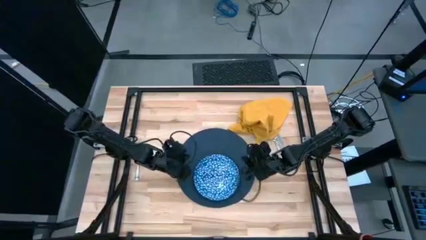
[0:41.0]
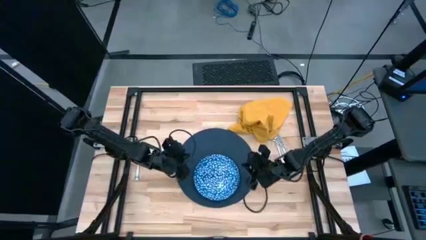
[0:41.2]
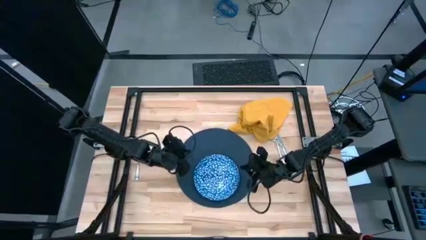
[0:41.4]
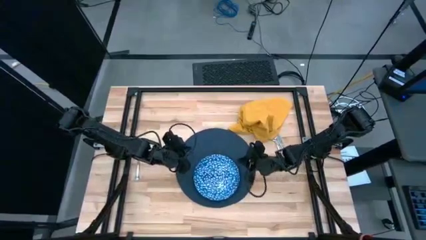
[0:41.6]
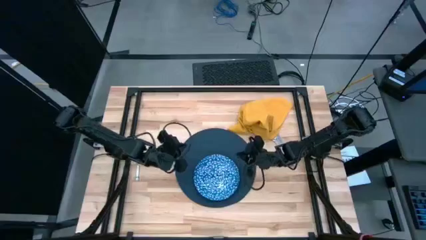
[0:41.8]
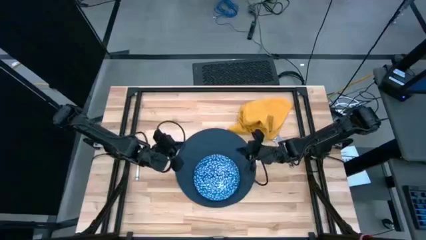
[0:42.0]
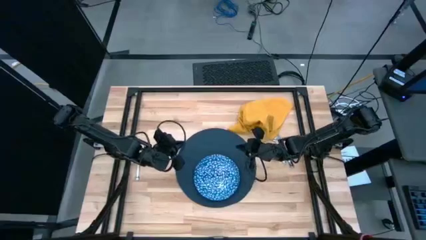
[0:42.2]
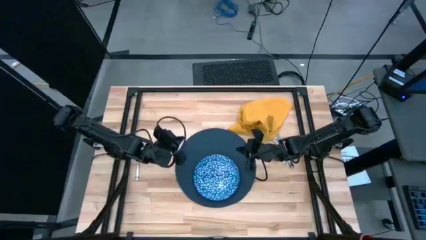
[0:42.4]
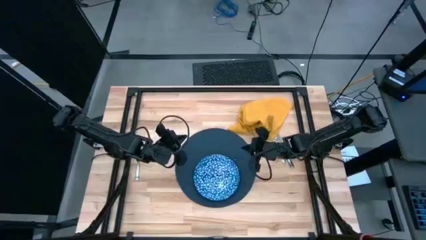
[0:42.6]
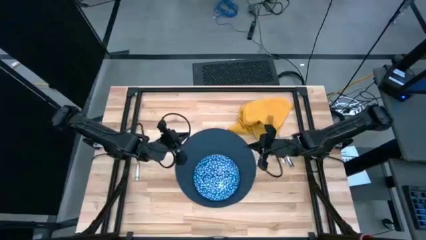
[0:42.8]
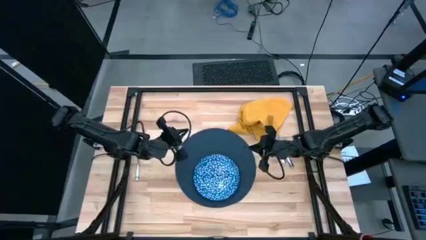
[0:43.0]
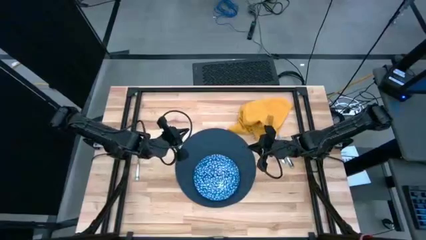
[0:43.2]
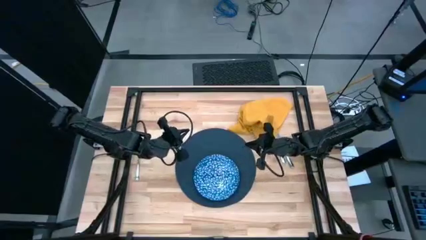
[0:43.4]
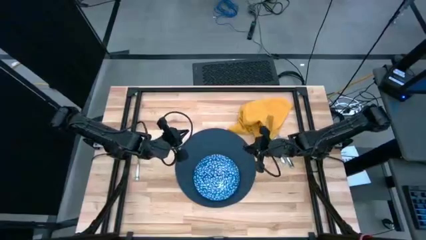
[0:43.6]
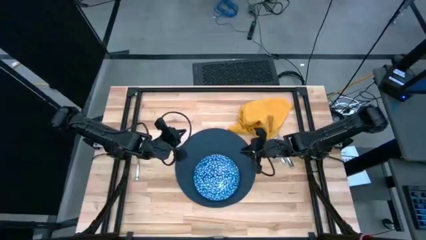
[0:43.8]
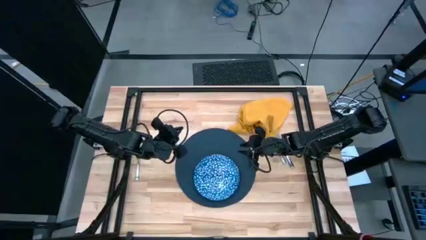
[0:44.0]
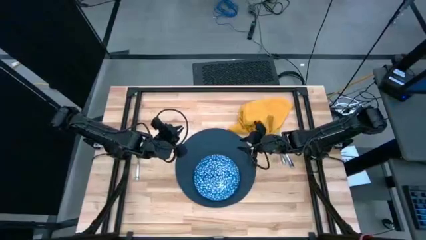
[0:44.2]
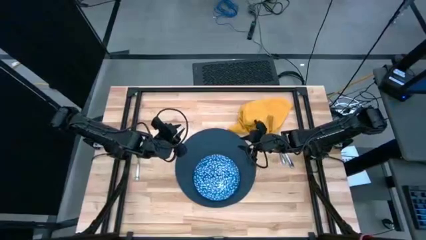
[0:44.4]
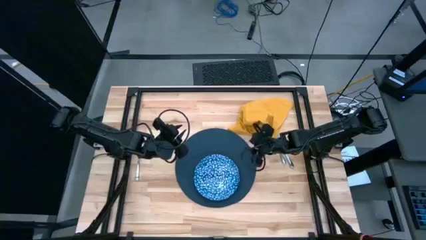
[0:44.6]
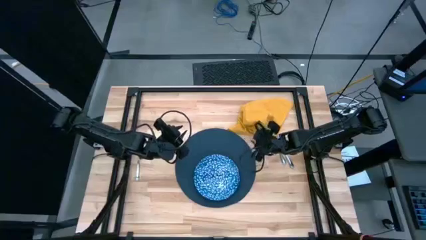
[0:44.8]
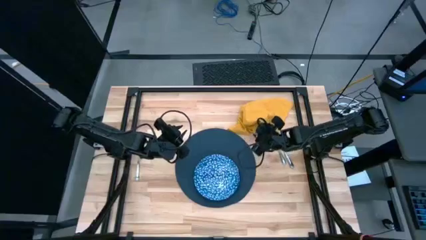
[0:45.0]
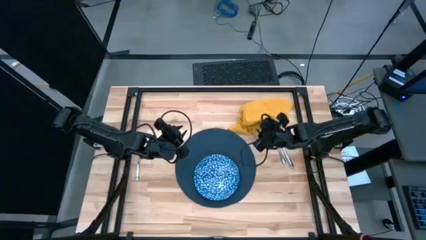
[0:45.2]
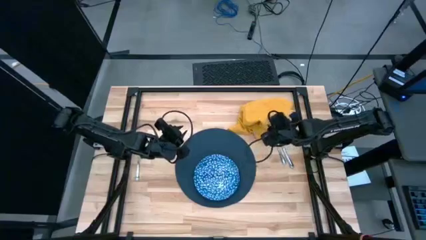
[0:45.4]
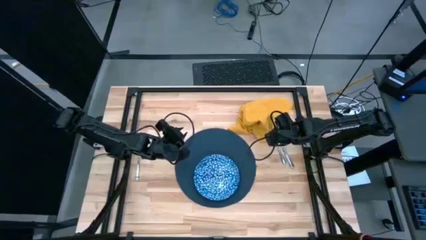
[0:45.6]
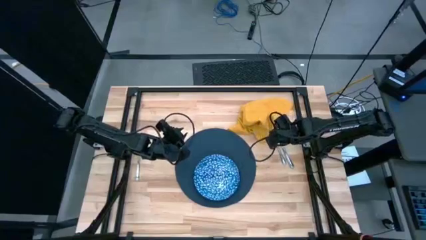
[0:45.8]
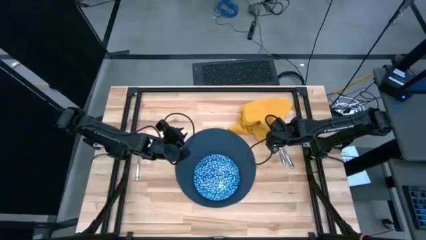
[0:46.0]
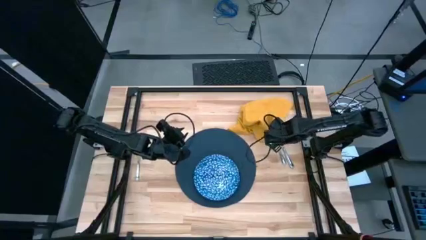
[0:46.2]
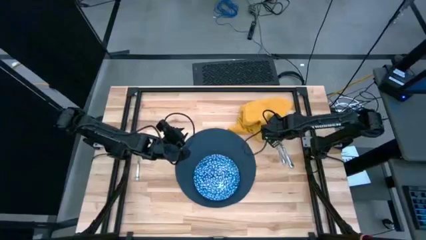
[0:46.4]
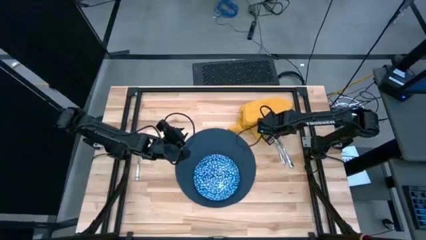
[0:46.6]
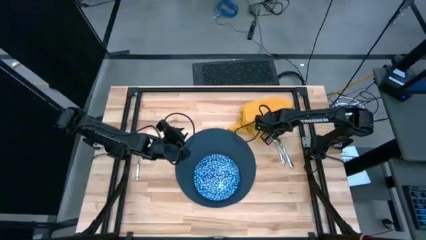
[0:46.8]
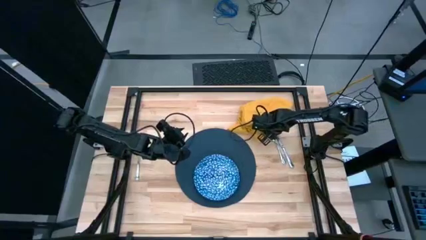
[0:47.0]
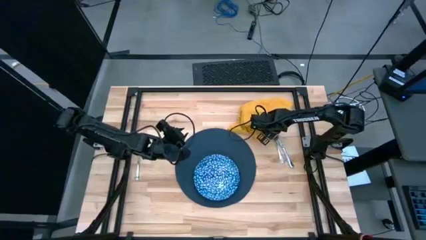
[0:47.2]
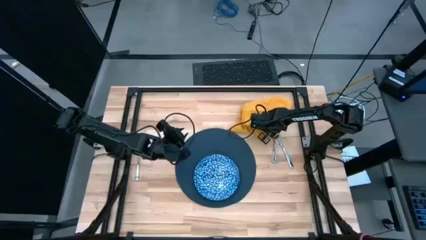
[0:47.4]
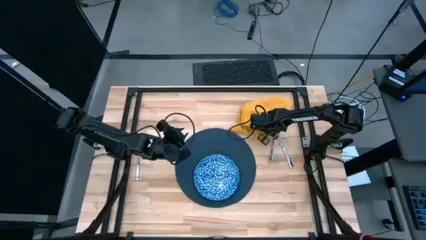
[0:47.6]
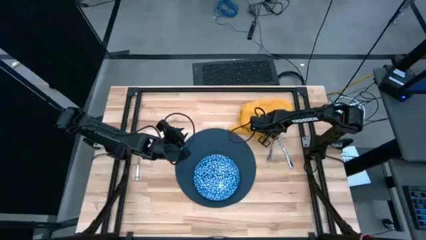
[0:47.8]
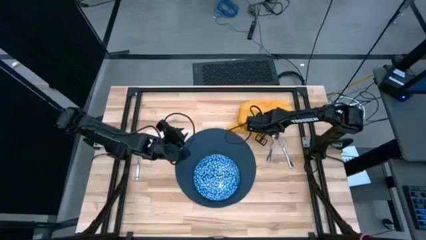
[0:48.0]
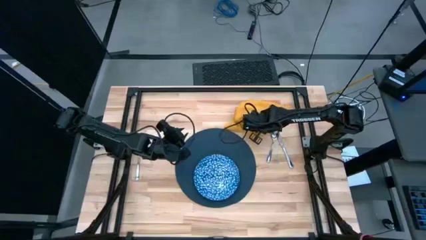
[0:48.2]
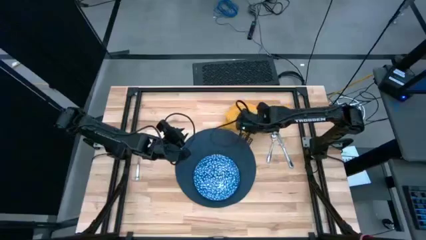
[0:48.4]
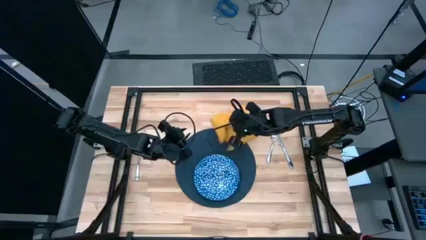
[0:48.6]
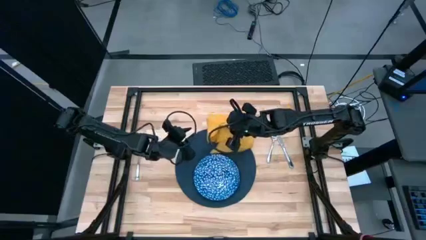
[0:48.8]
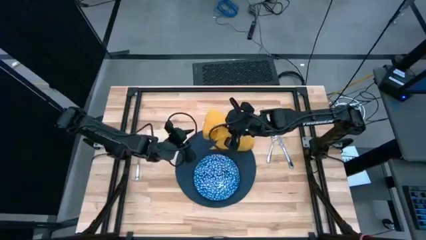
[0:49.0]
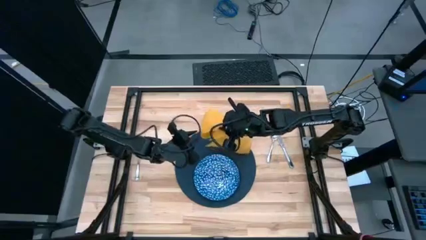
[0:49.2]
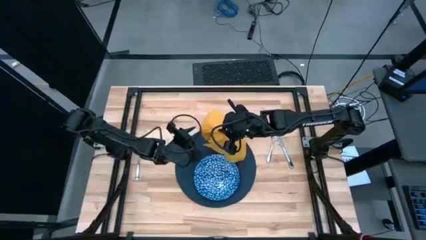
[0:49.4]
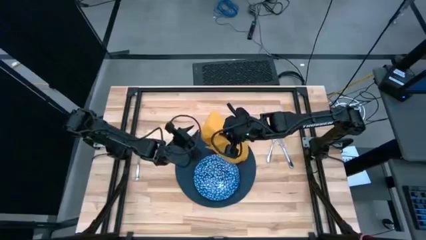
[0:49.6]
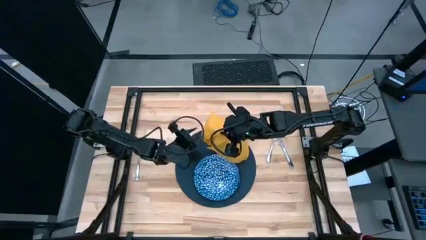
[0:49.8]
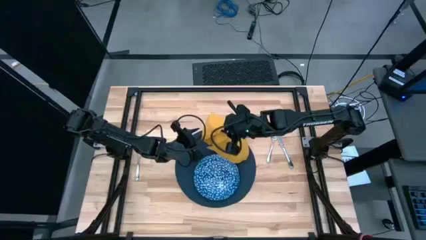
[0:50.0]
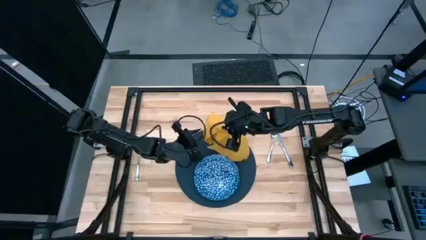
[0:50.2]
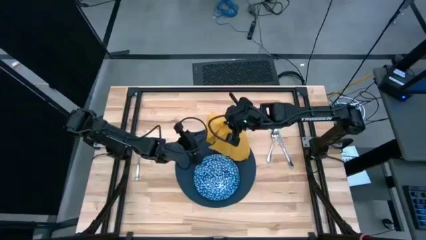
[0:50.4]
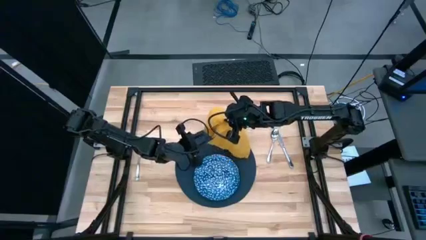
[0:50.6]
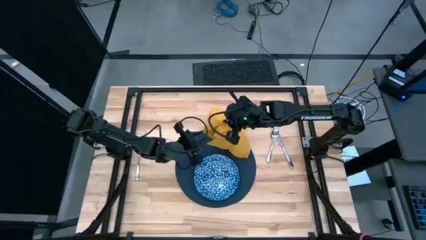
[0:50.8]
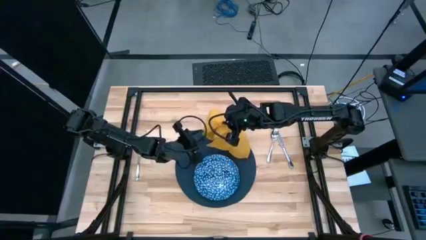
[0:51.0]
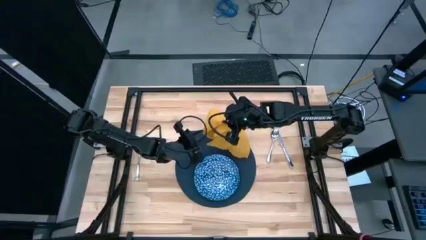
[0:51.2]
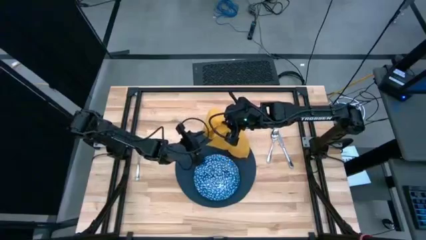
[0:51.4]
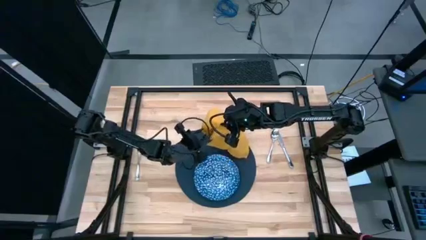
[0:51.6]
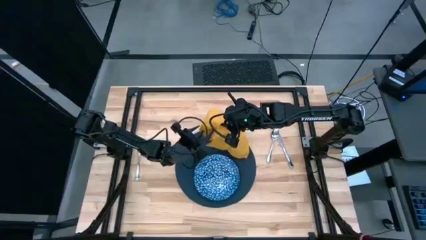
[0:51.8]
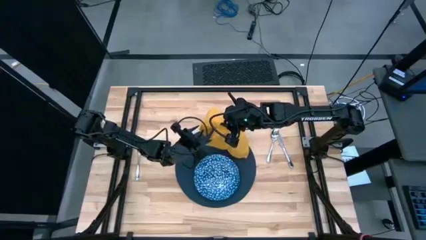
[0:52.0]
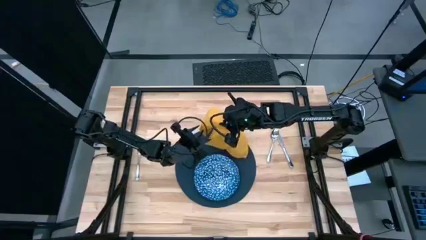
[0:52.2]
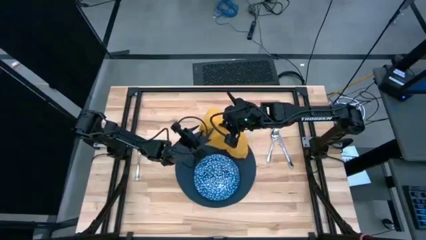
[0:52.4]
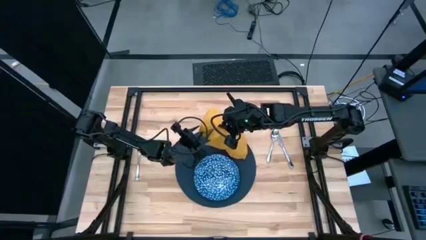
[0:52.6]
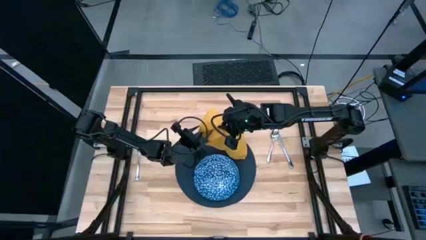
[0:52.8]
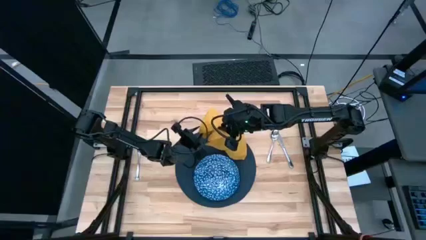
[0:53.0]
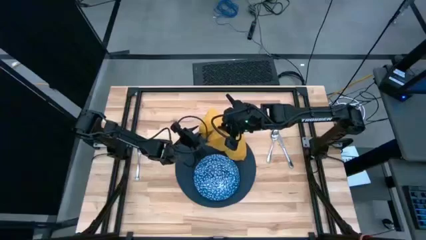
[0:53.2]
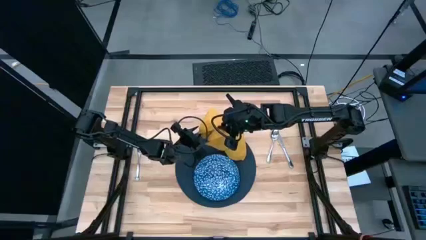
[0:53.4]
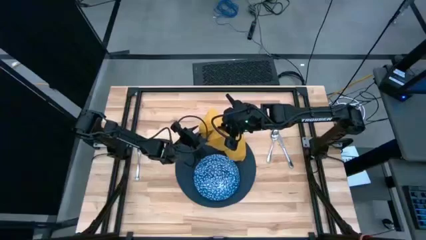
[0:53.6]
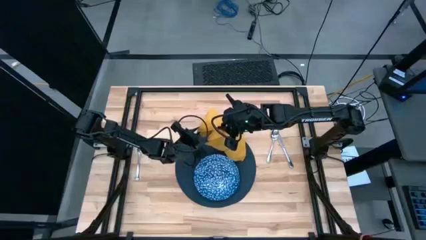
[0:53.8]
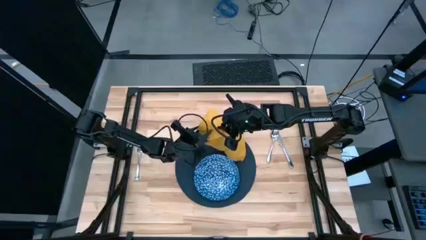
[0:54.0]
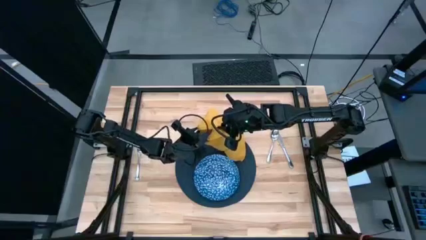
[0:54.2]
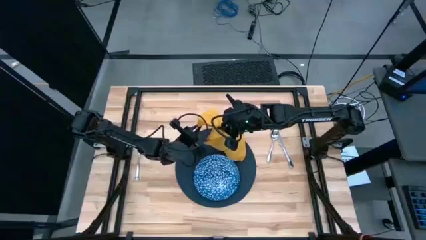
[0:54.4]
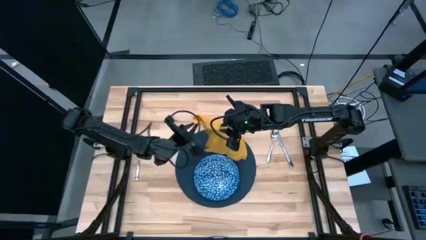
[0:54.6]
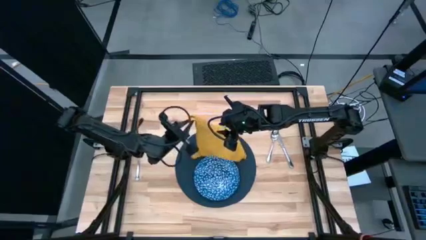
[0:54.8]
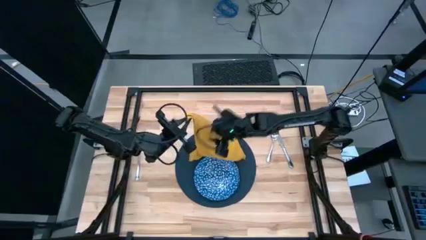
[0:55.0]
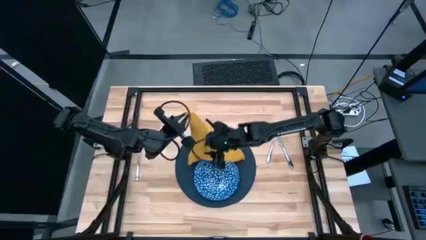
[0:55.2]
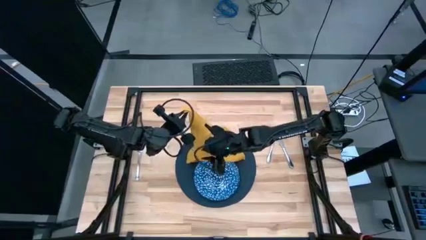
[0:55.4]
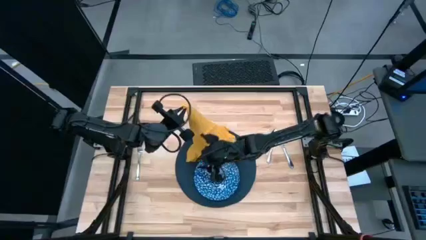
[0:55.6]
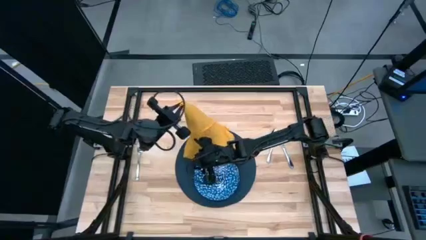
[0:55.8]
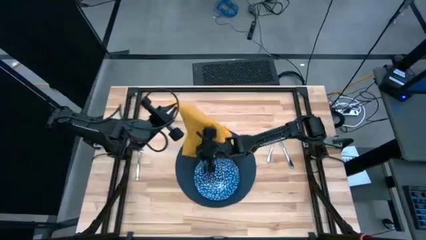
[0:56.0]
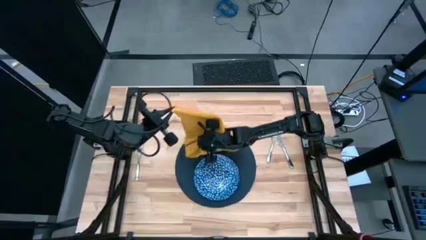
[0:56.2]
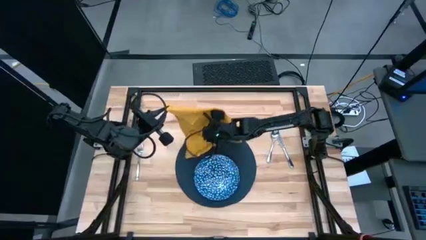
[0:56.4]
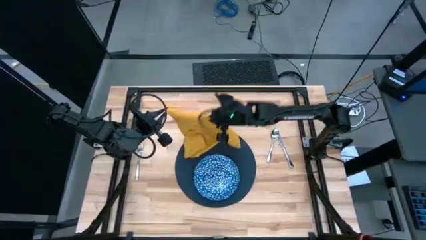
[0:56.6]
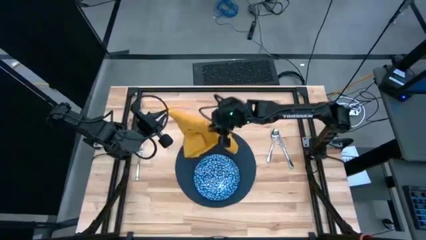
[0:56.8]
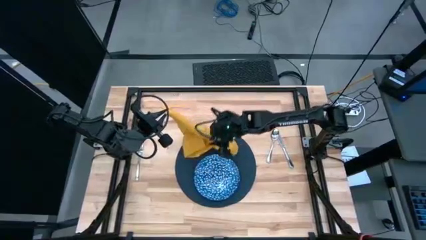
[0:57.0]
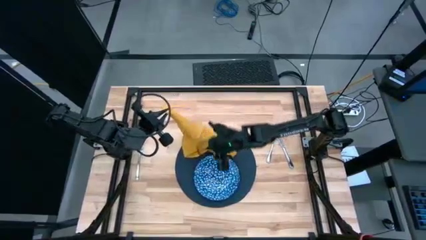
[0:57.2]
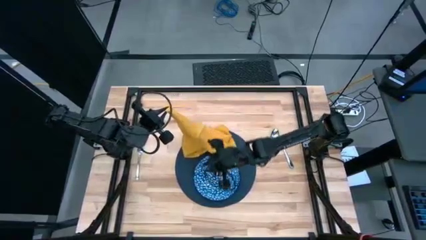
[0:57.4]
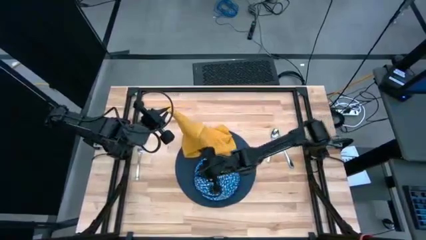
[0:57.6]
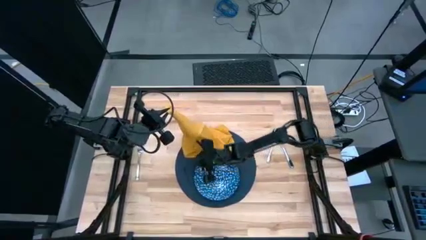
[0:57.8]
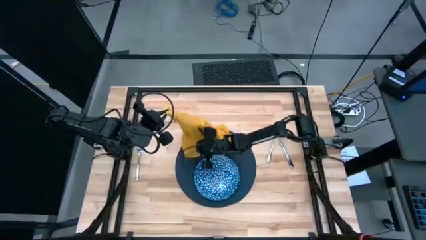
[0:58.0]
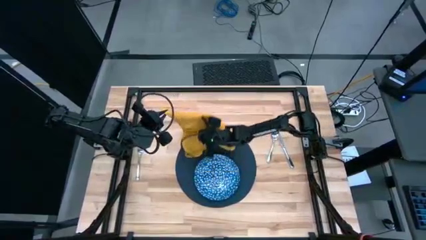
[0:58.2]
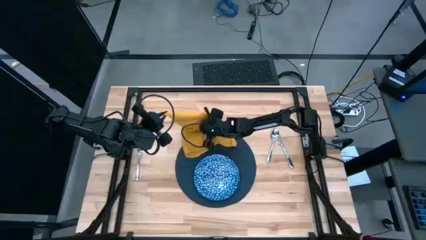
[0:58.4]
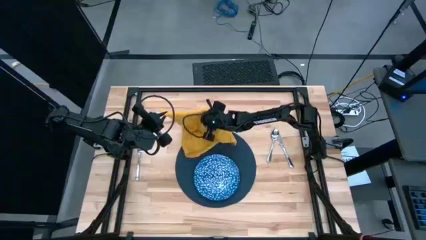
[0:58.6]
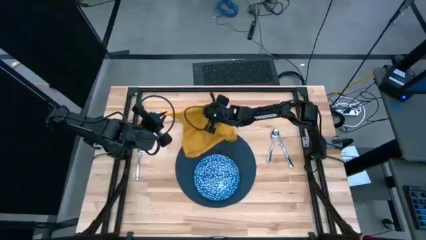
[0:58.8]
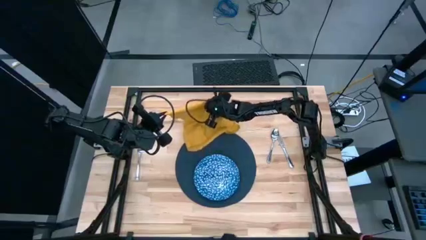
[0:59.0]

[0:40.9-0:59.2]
Task: Set table place
Fold the yellow table napkin
